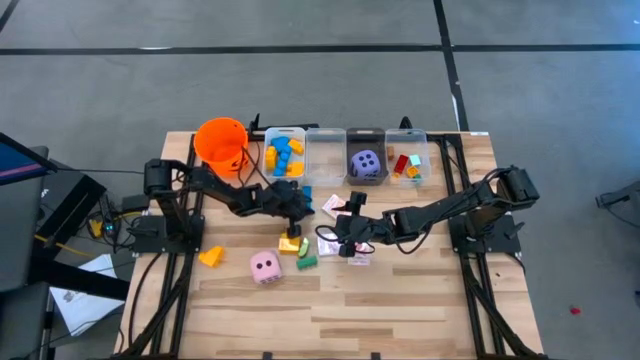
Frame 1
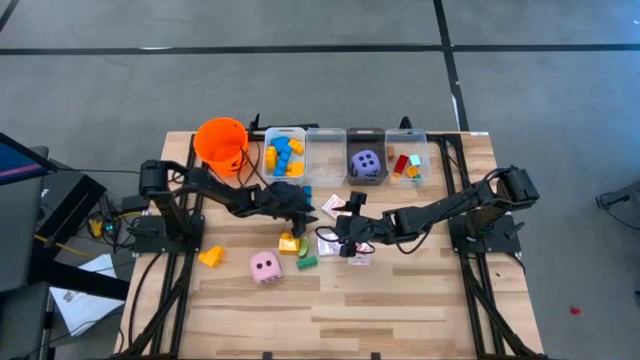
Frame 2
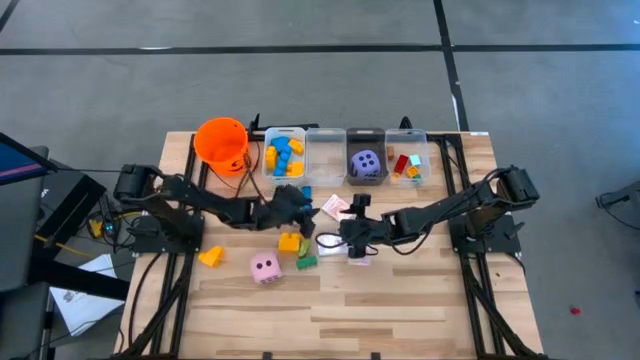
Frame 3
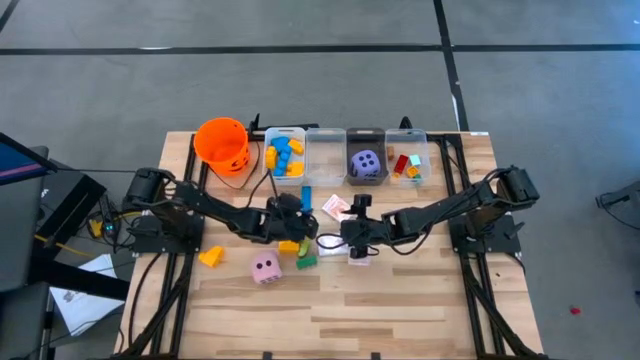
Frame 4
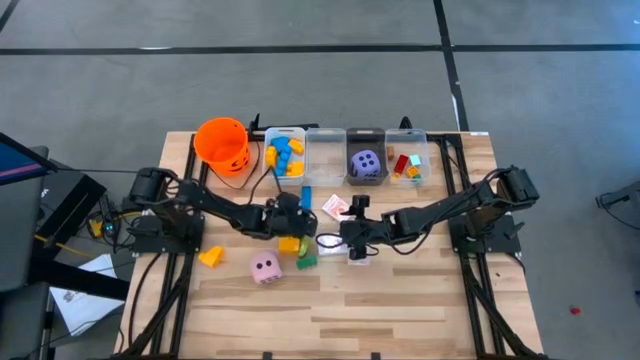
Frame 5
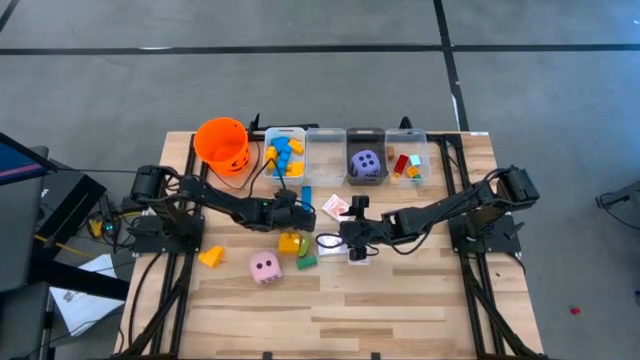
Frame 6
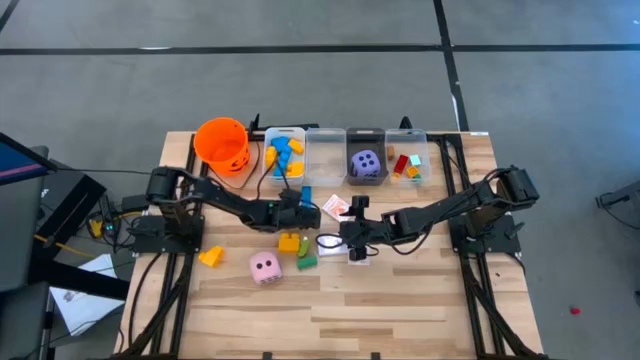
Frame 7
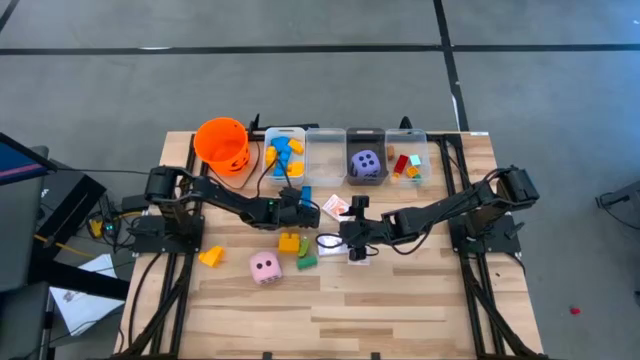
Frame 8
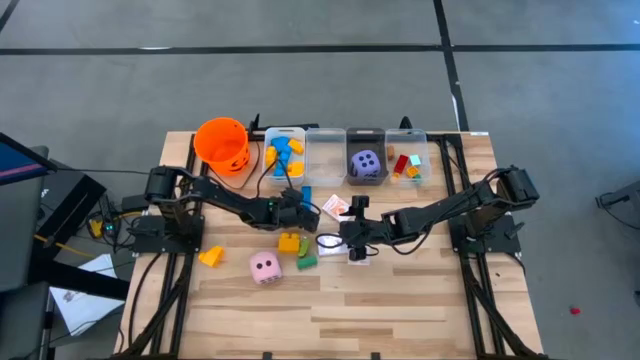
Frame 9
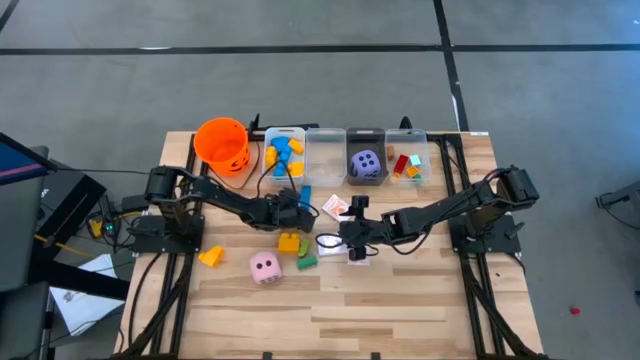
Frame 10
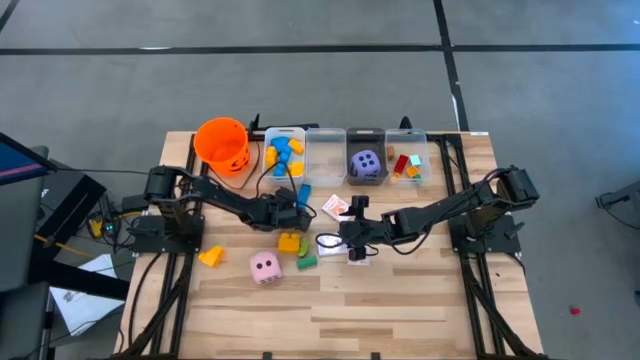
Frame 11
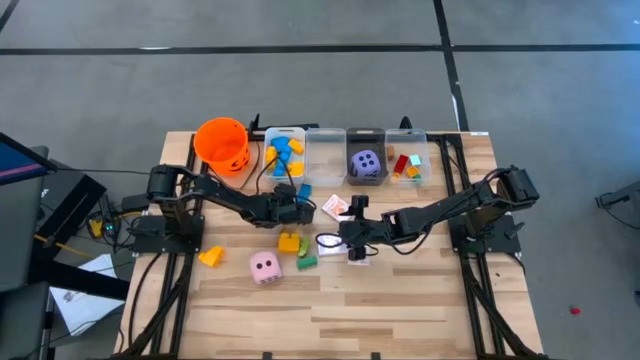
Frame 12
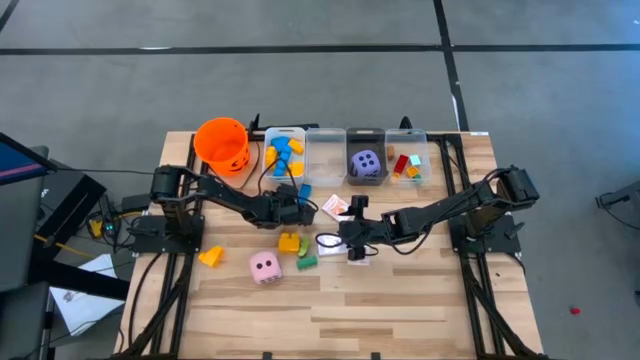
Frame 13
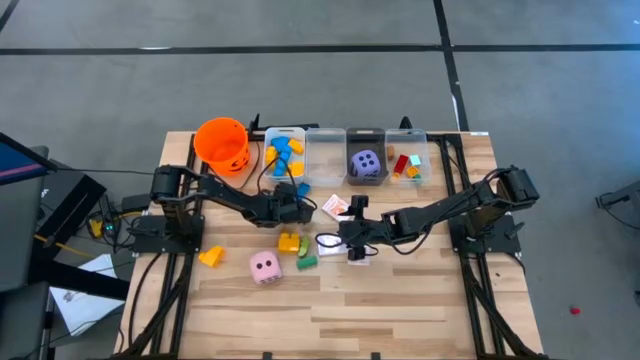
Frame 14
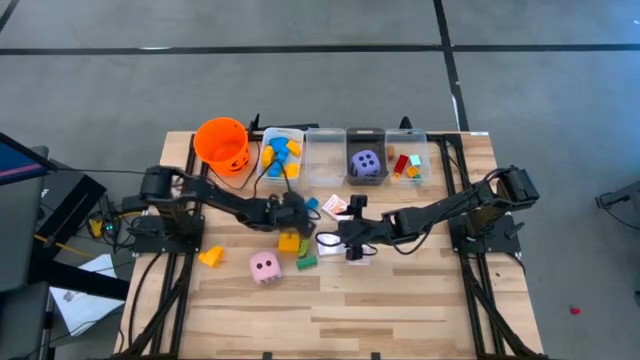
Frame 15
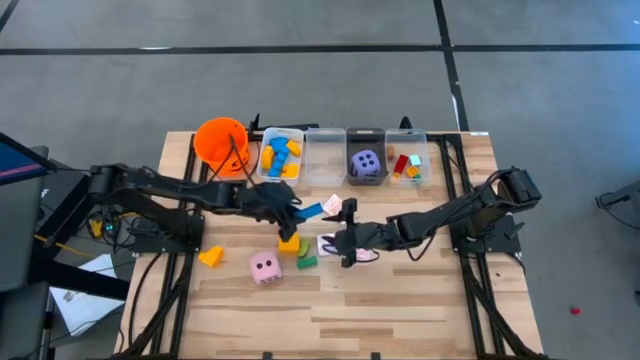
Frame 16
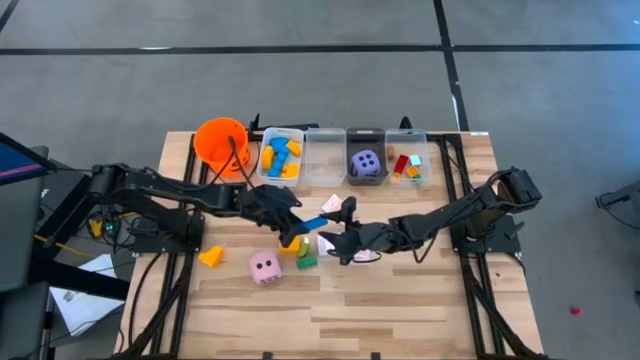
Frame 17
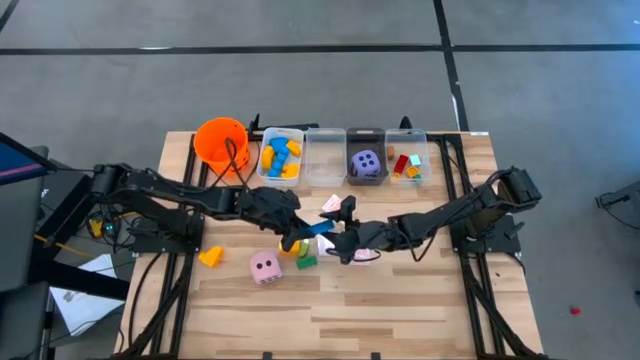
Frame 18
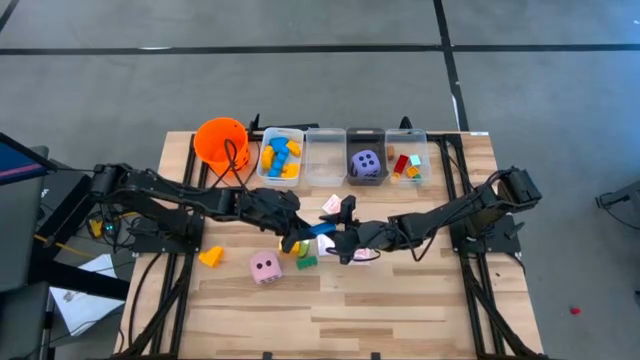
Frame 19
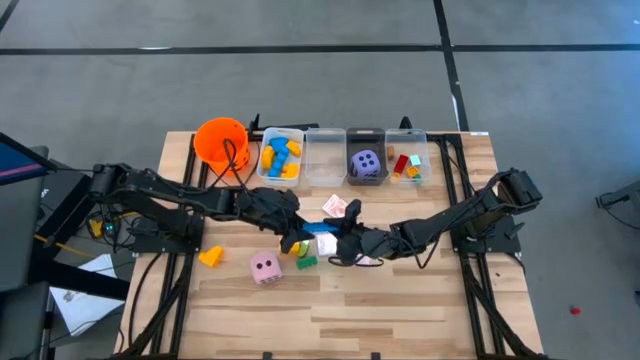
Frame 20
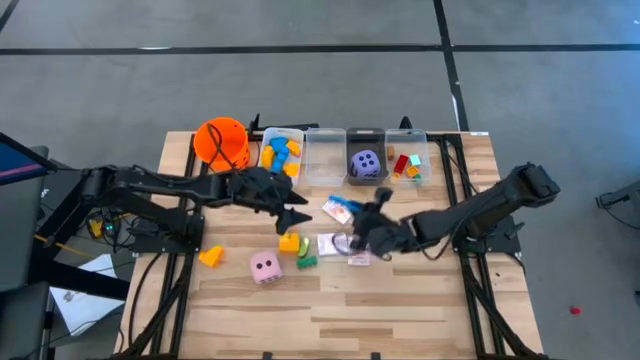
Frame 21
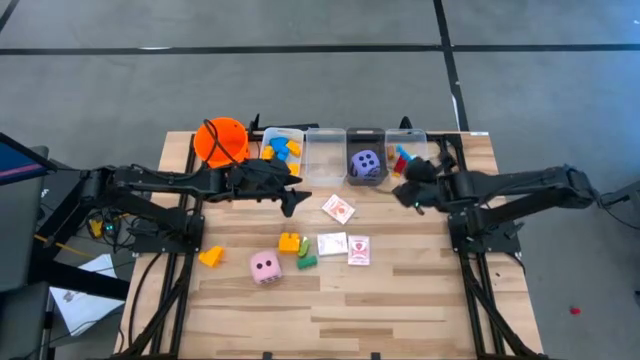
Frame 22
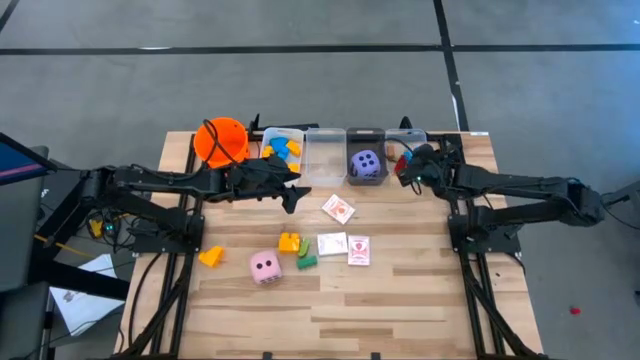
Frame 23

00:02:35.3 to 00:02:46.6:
Task: Pick & Place Toys
Put the small blue game piece into the right transparent bin

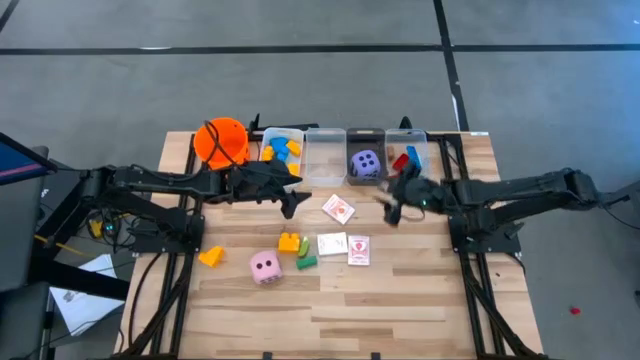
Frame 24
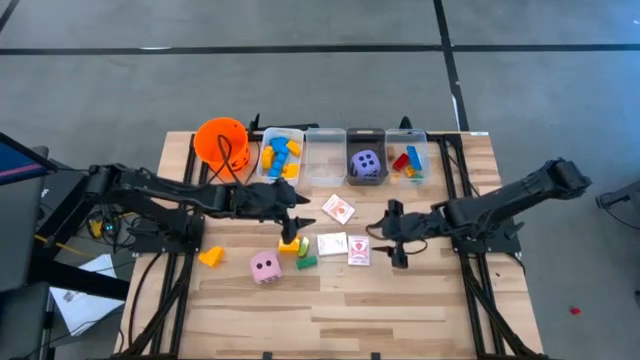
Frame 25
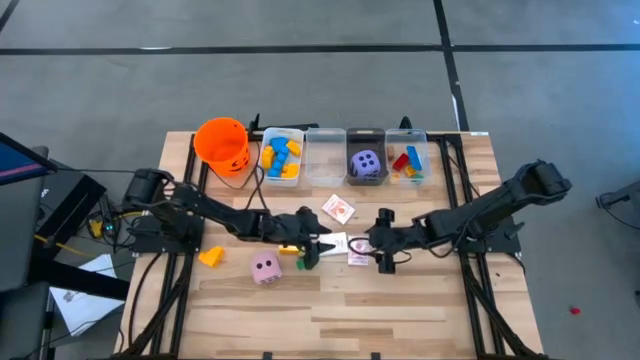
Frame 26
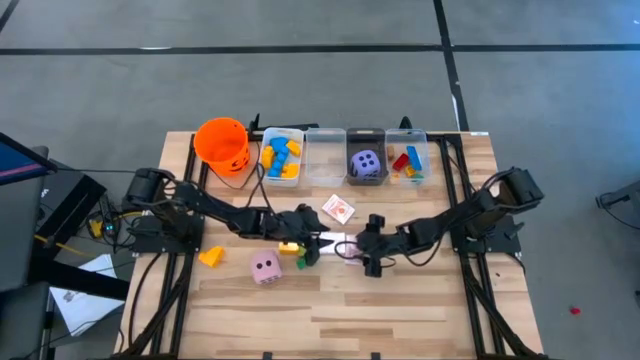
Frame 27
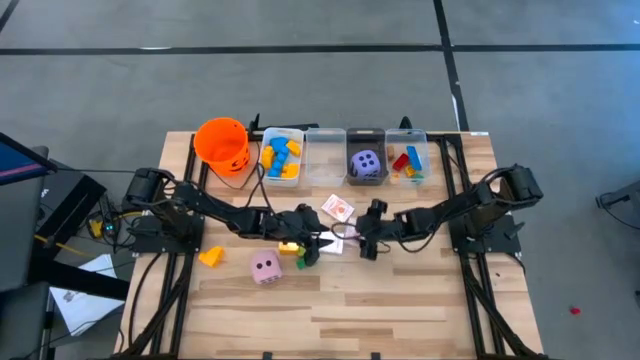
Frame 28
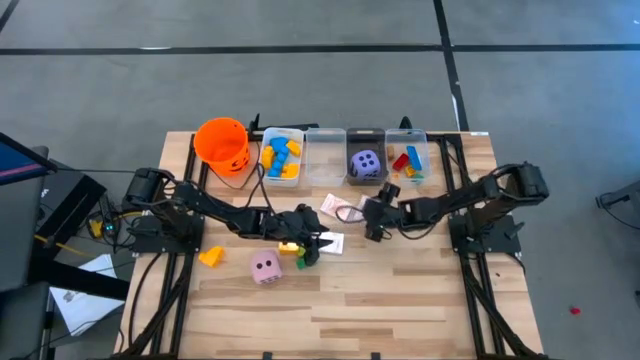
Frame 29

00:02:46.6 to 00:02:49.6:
Adjust the red deck of cards on the table

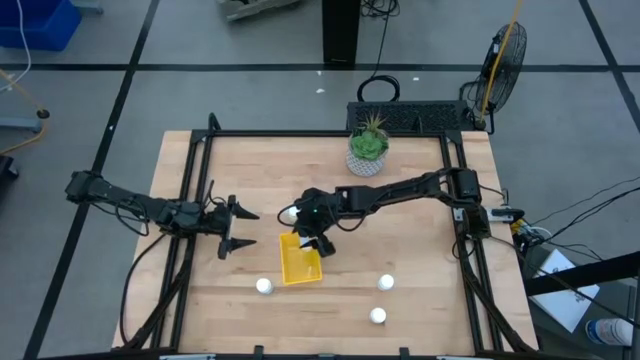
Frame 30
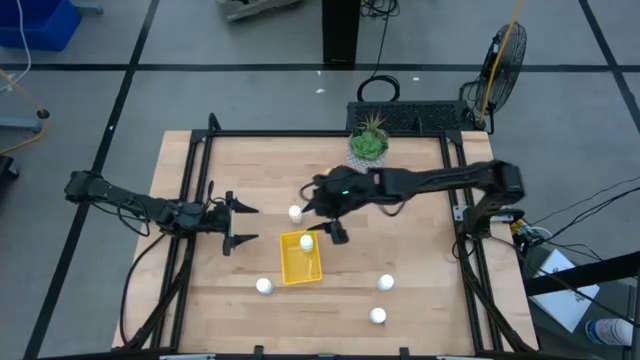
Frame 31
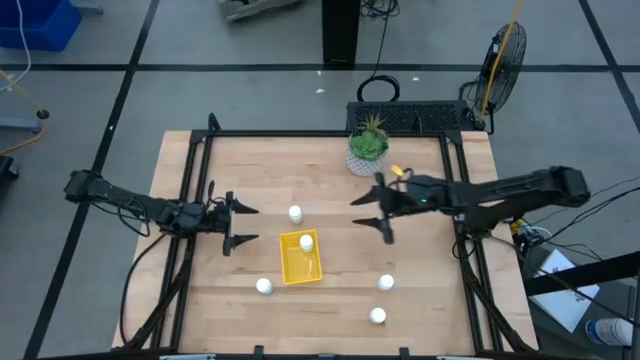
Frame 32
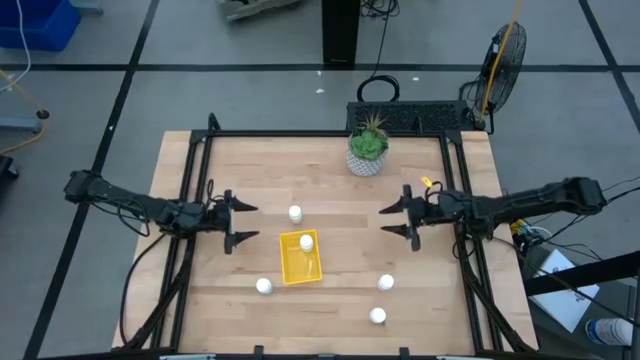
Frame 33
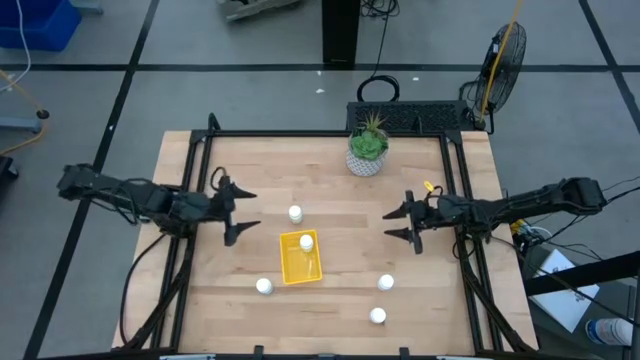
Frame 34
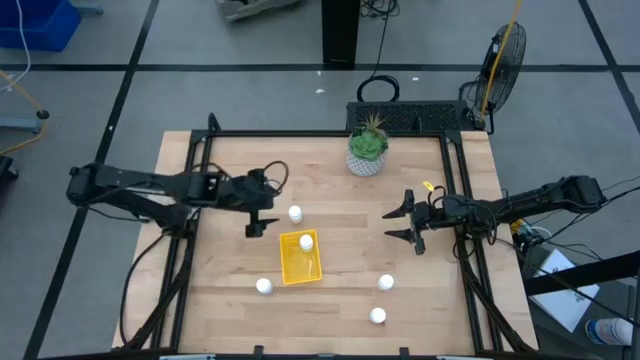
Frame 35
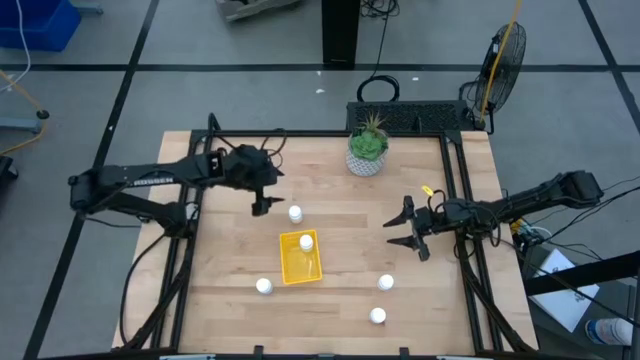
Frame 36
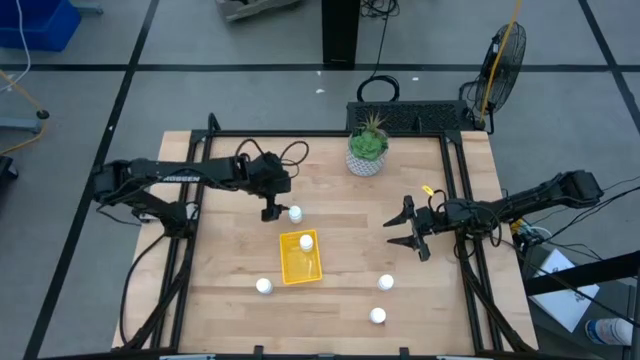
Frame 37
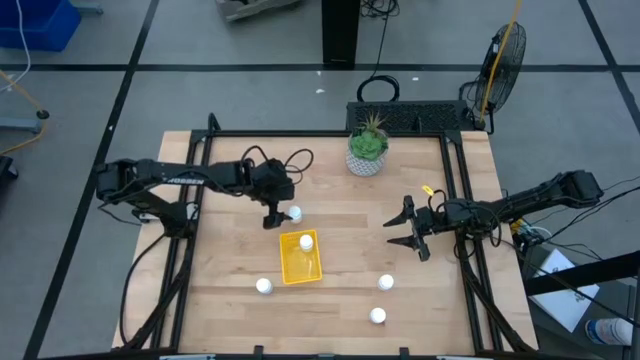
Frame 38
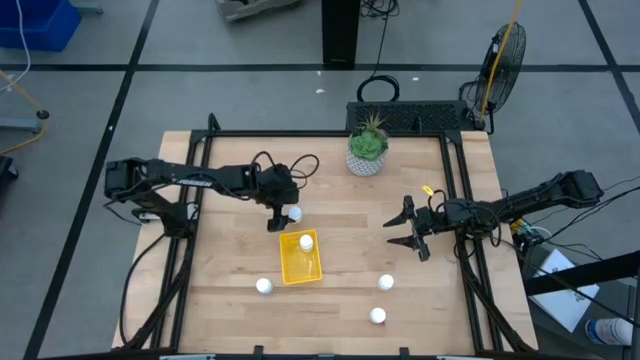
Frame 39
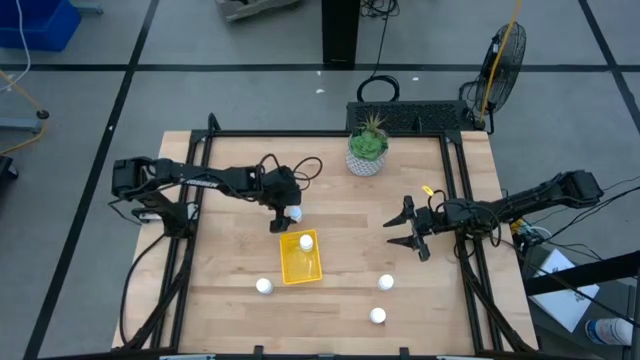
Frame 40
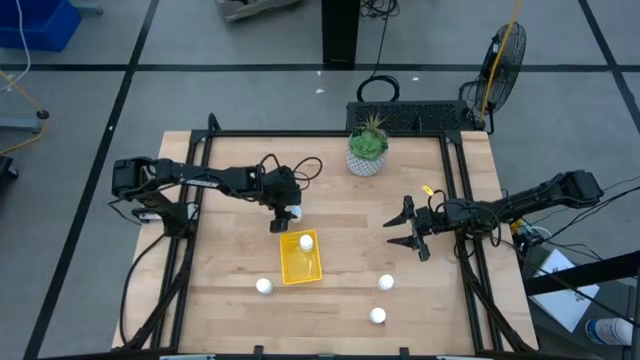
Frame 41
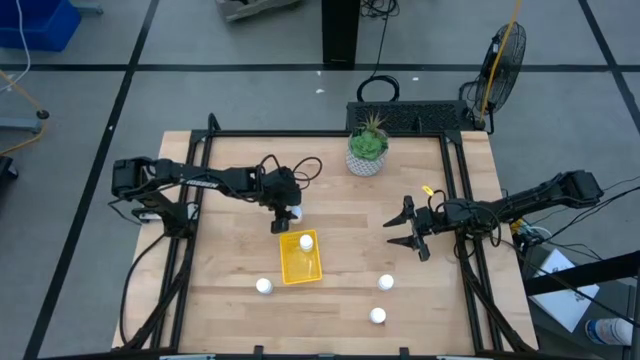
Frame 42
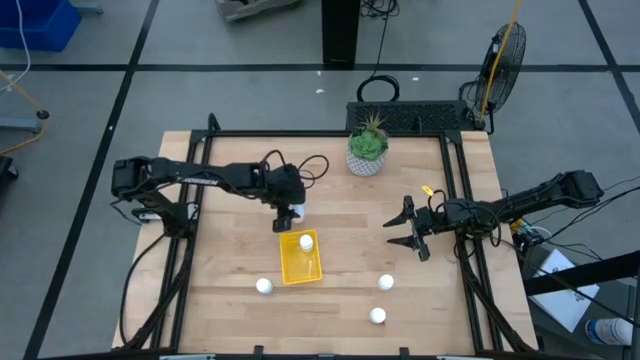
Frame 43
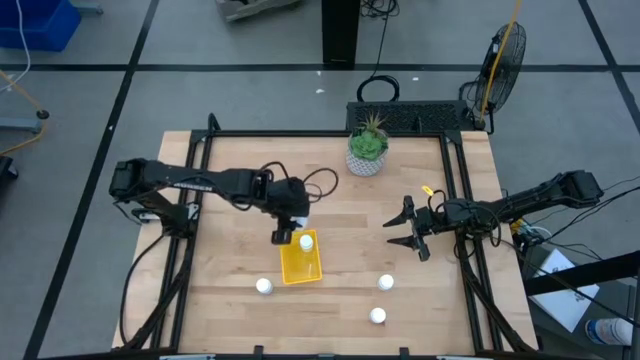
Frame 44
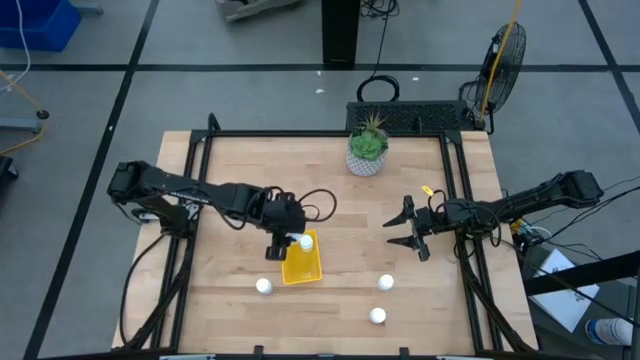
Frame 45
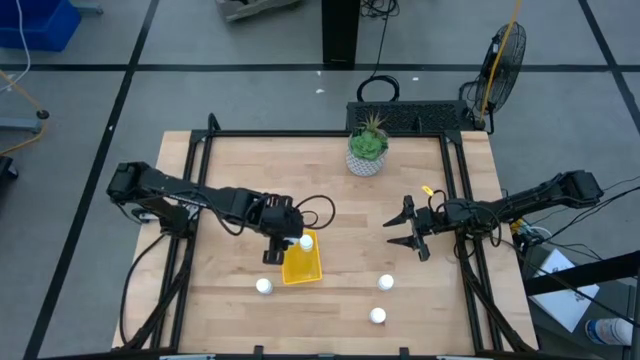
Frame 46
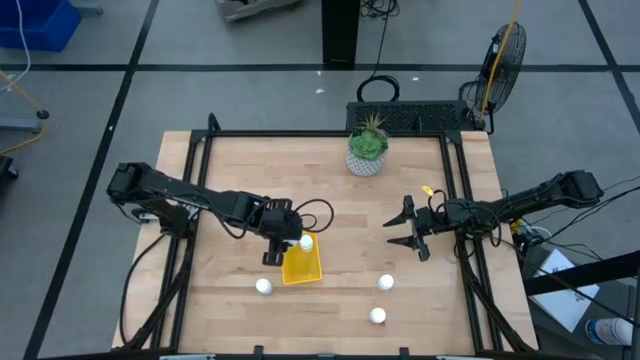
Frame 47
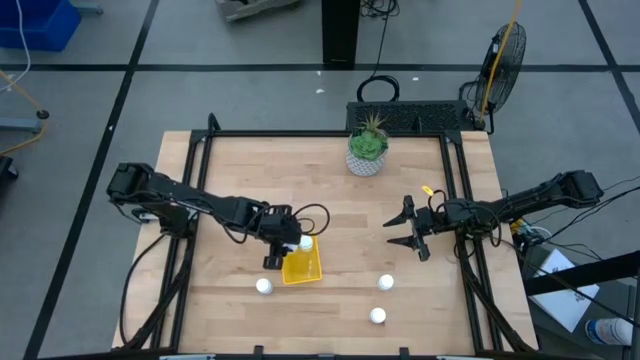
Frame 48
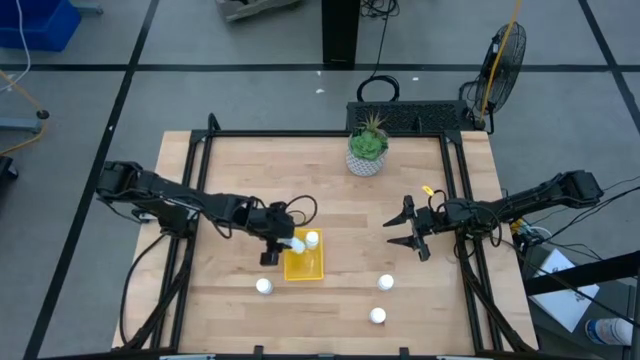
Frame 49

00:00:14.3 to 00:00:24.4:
Task: Pick and place pill bottles into a basket
Put the white pill bottle into the yellow basket
